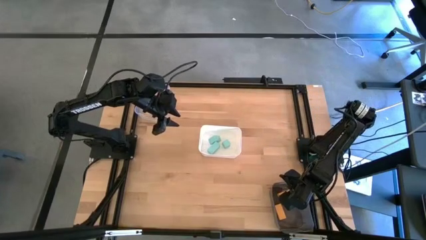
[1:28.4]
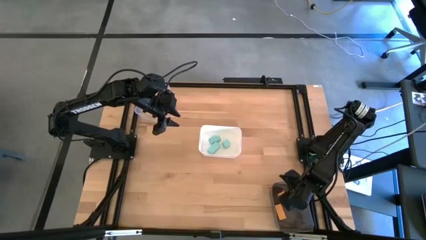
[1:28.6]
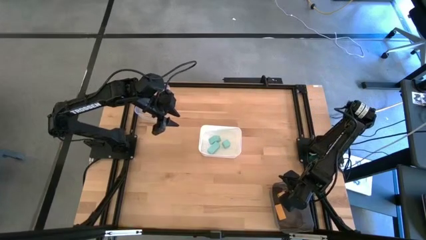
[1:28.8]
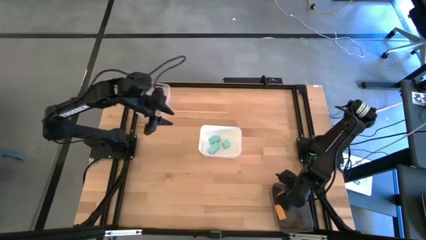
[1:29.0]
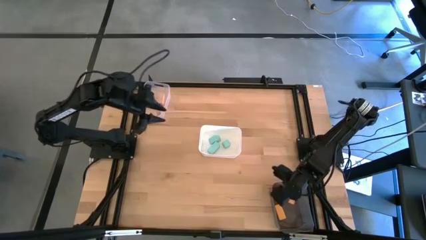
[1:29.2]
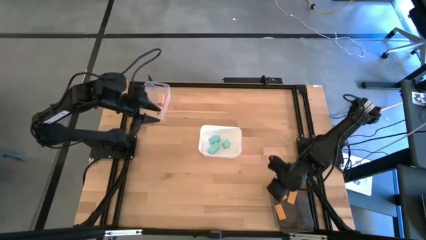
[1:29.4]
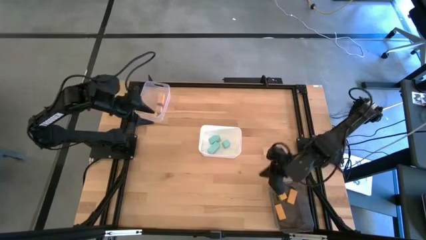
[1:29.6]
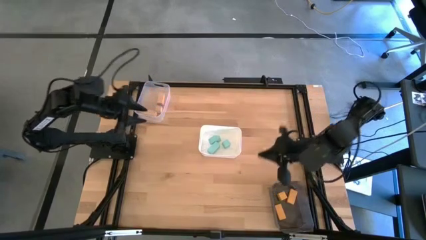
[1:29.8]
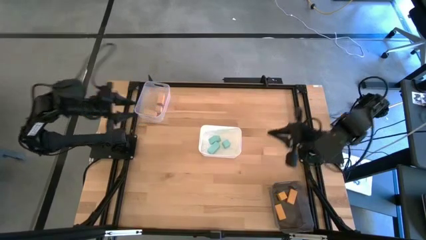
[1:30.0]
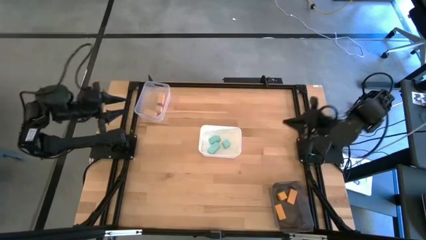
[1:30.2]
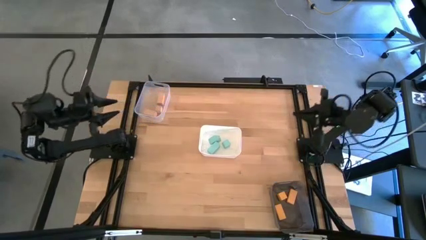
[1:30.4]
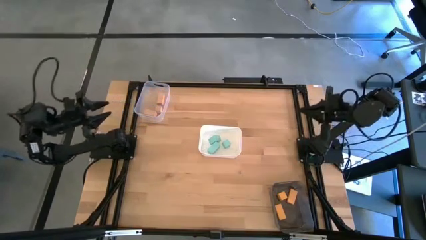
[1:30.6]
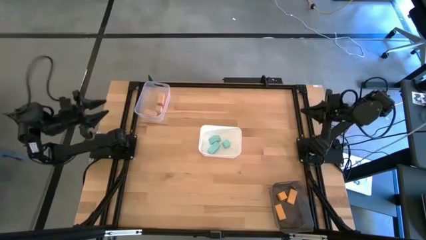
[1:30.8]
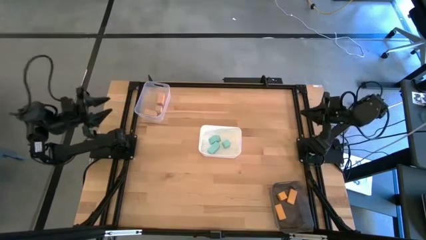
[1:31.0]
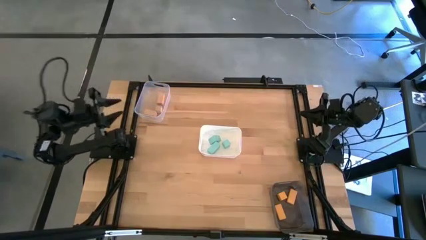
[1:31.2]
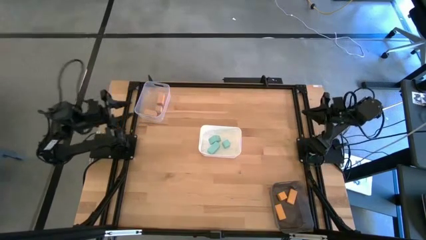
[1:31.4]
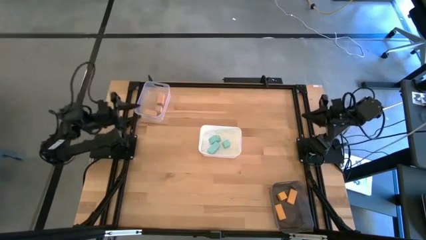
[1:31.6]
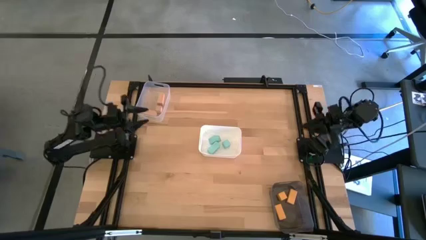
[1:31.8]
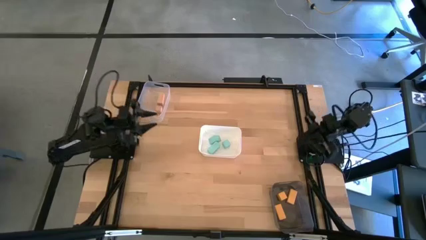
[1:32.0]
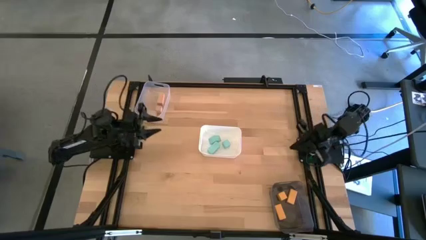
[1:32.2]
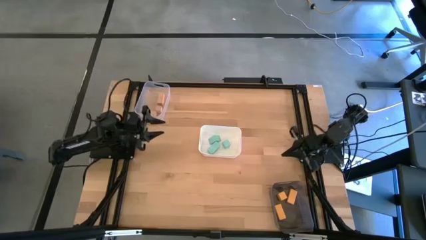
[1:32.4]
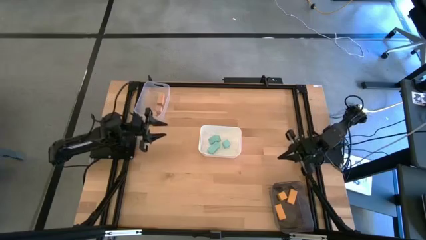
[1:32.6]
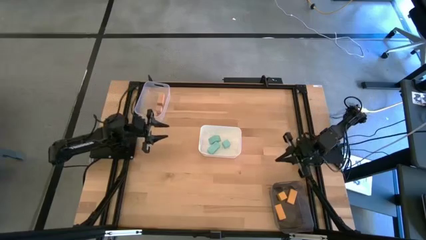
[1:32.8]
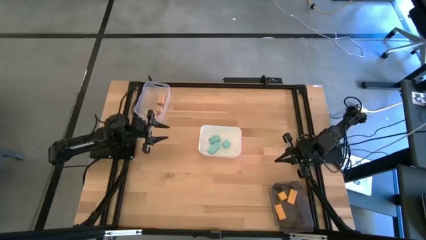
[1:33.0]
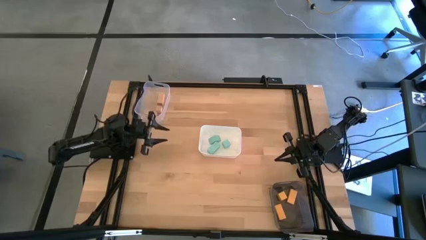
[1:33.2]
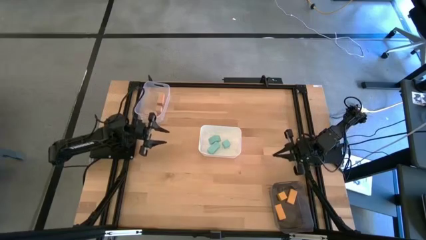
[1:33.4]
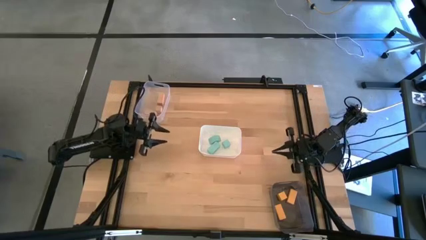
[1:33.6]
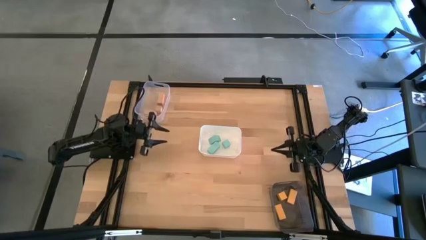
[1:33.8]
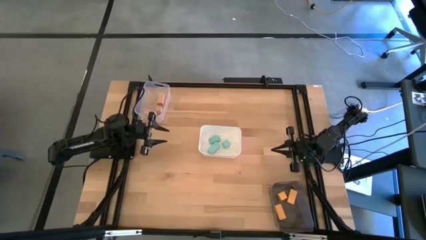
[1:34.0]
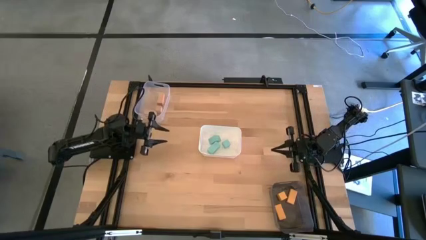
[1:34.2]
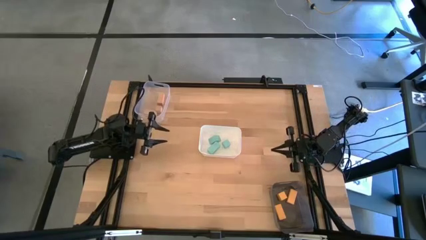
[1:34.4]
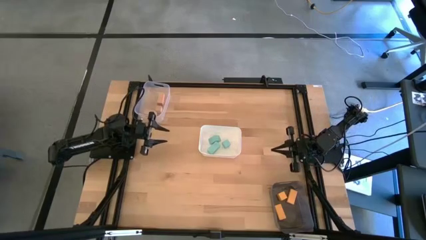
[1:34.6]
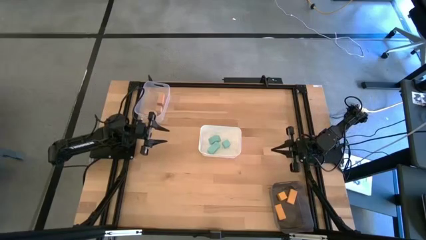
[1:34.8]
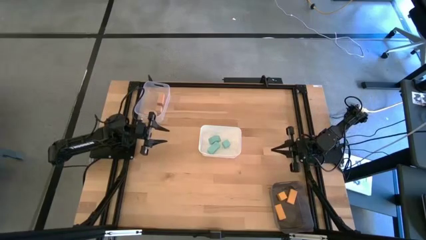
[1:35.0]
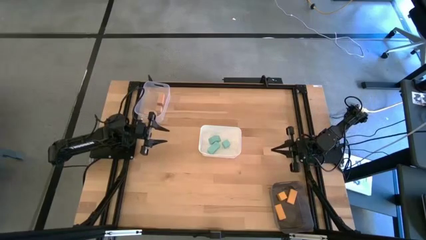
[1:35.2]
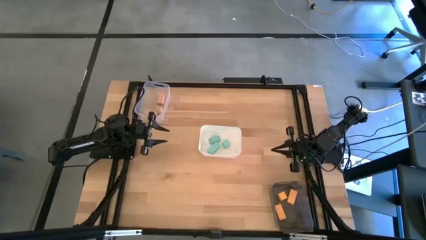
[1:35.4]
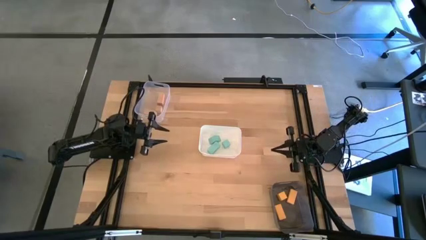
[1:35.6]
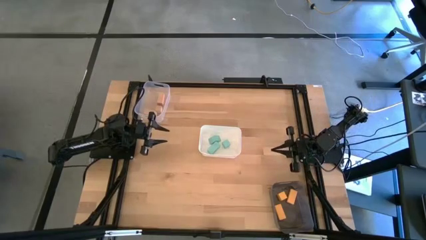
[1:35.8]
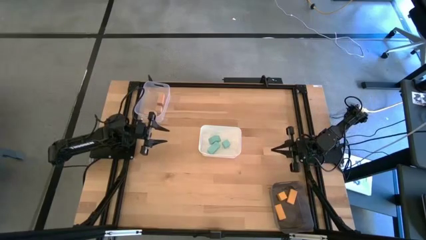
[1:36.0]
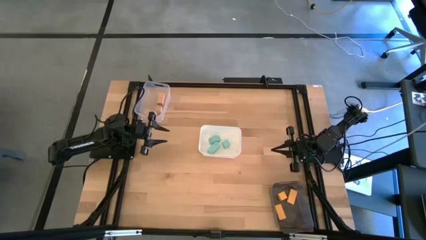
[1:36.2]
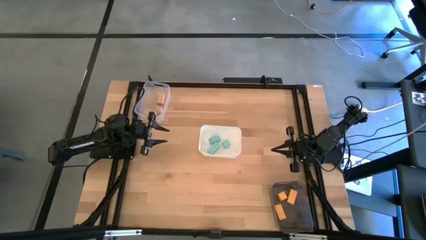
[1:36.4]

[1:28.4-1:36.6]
Task: Sort & place blocks by color
Return to Home Position

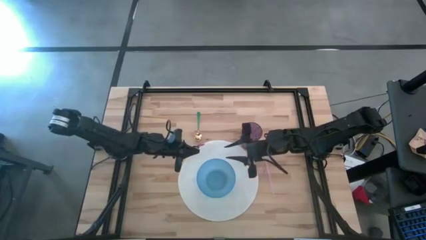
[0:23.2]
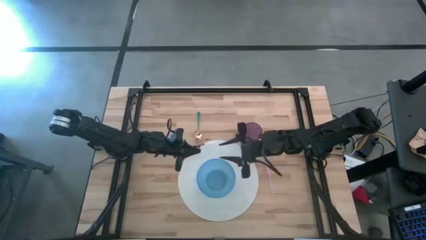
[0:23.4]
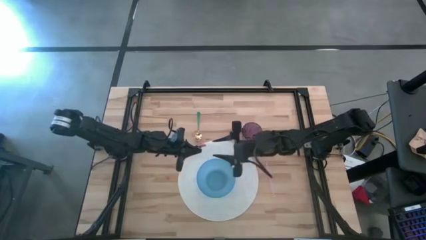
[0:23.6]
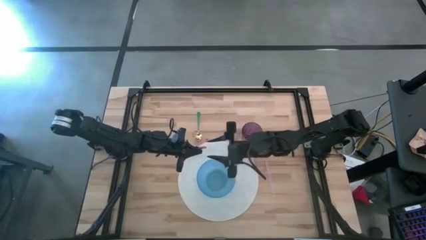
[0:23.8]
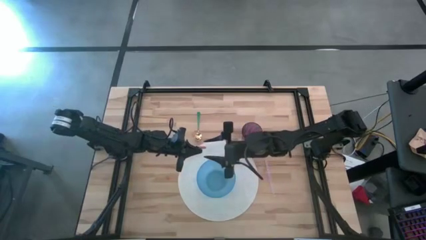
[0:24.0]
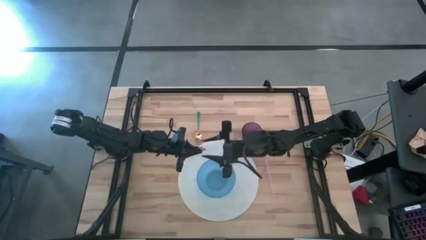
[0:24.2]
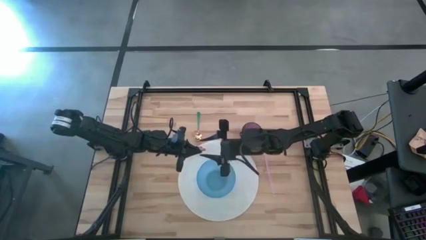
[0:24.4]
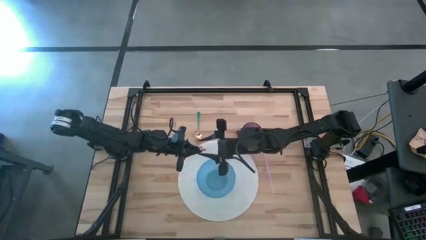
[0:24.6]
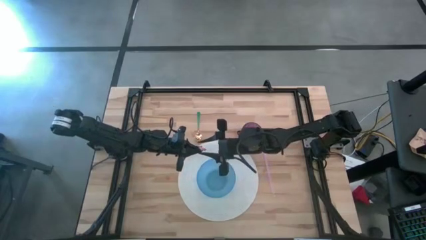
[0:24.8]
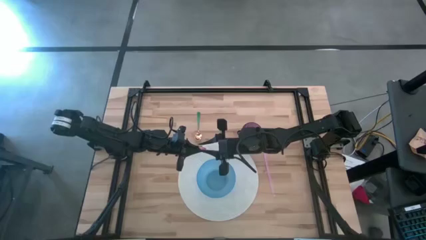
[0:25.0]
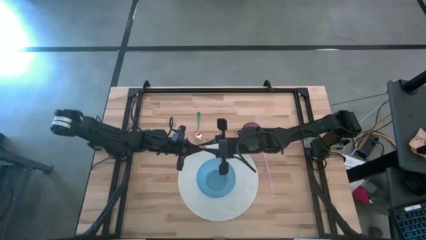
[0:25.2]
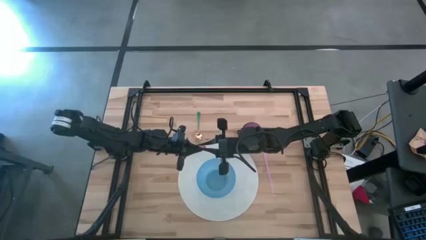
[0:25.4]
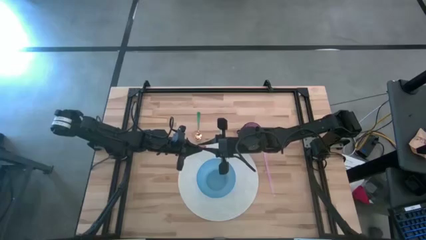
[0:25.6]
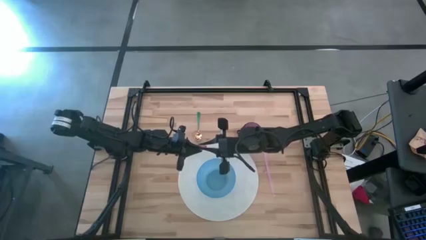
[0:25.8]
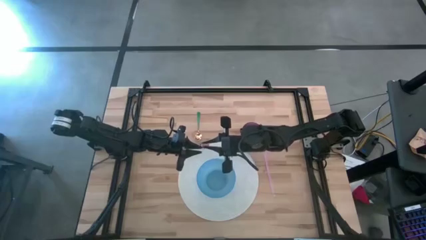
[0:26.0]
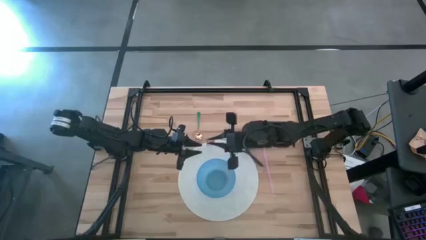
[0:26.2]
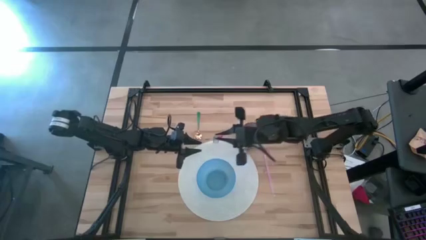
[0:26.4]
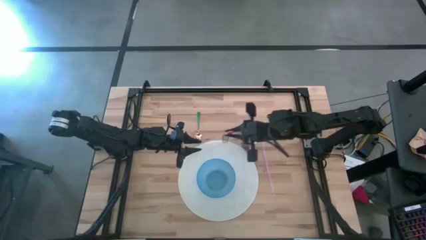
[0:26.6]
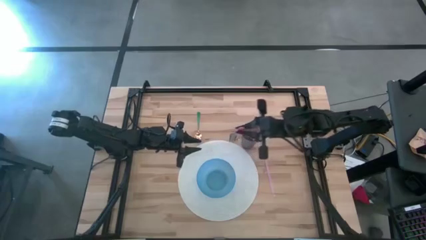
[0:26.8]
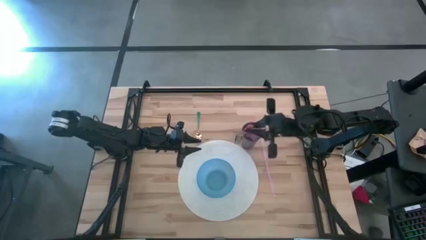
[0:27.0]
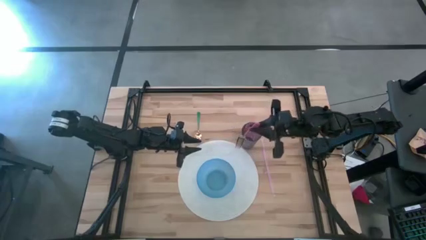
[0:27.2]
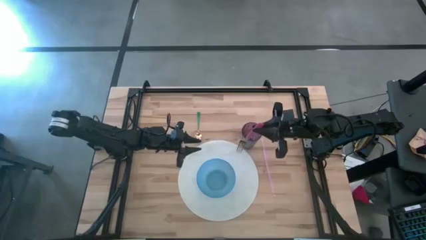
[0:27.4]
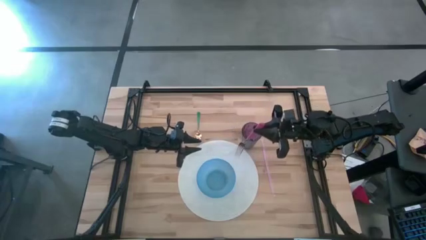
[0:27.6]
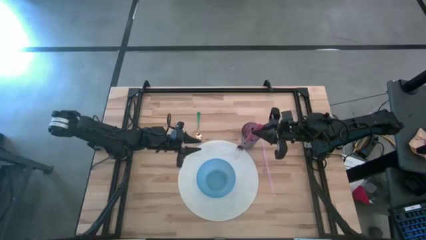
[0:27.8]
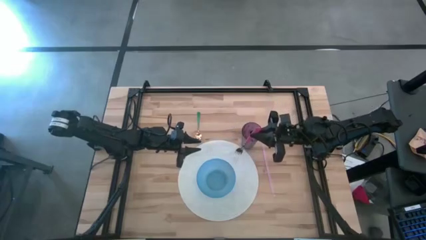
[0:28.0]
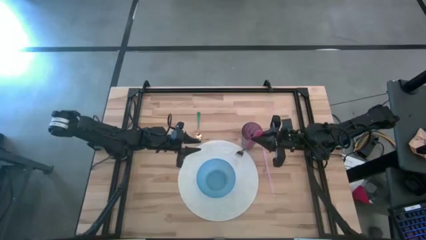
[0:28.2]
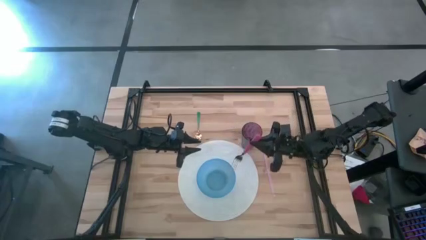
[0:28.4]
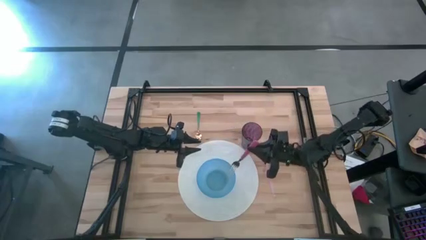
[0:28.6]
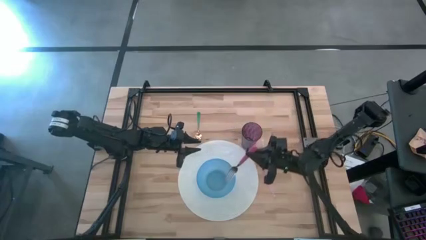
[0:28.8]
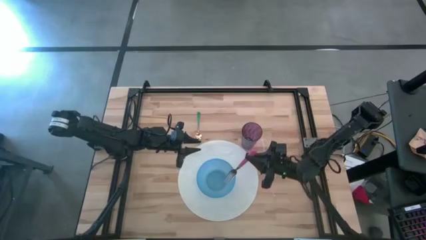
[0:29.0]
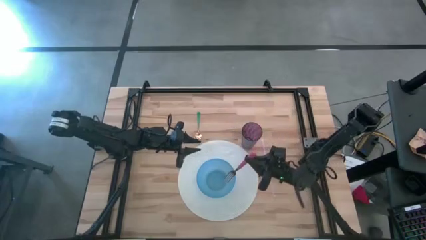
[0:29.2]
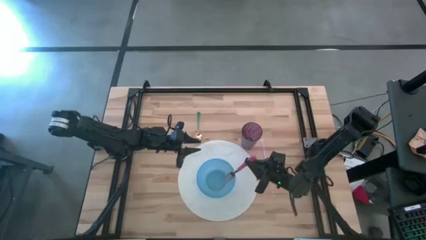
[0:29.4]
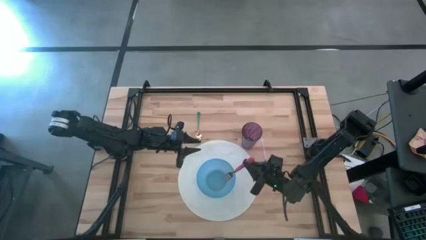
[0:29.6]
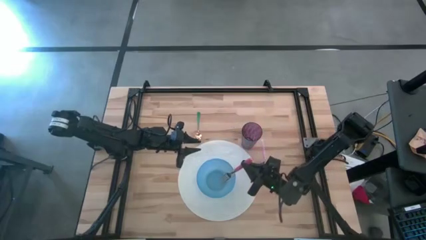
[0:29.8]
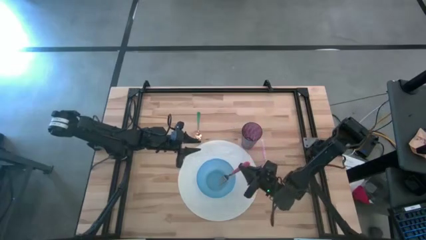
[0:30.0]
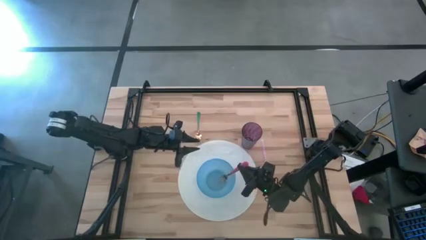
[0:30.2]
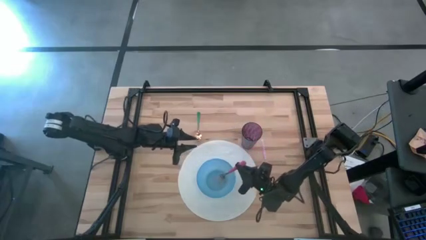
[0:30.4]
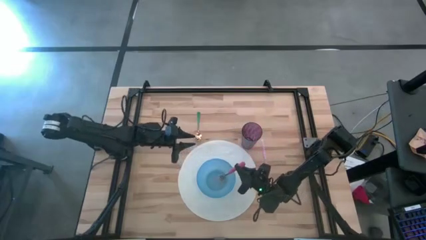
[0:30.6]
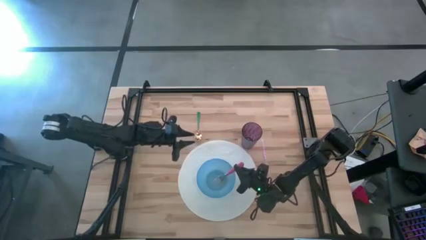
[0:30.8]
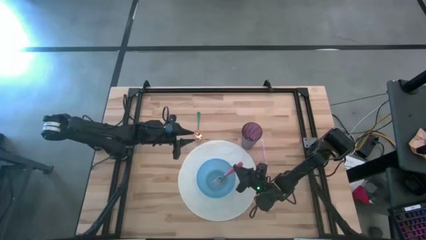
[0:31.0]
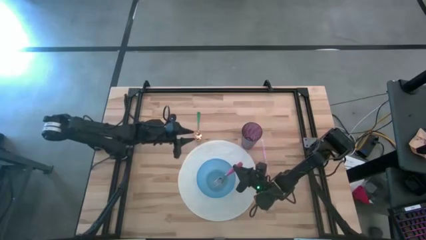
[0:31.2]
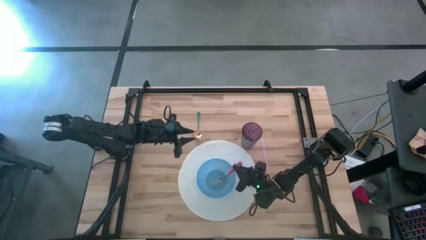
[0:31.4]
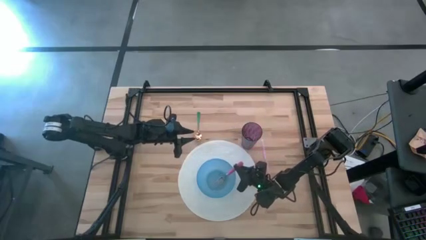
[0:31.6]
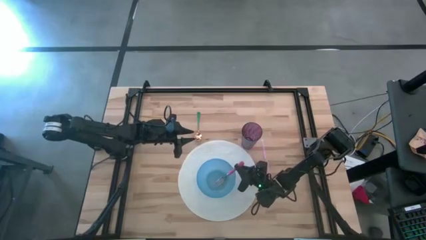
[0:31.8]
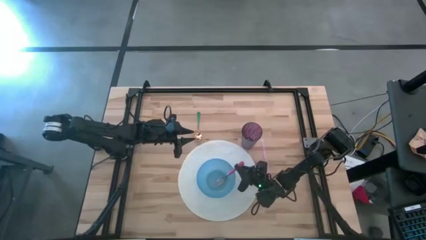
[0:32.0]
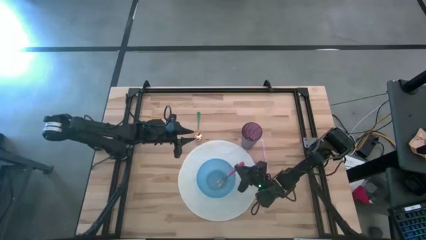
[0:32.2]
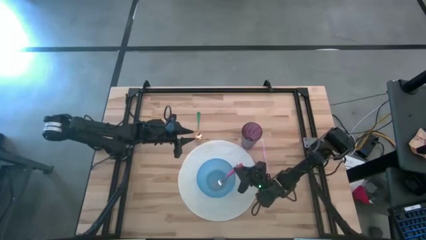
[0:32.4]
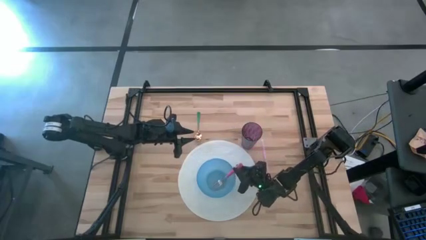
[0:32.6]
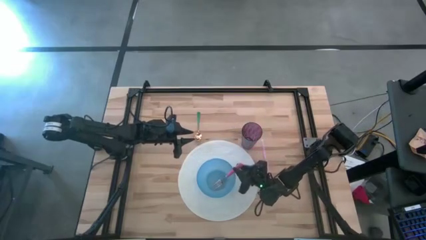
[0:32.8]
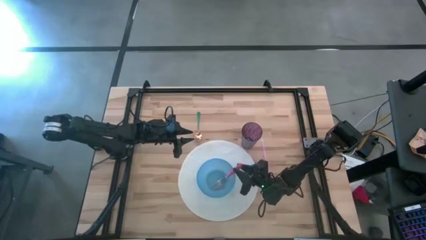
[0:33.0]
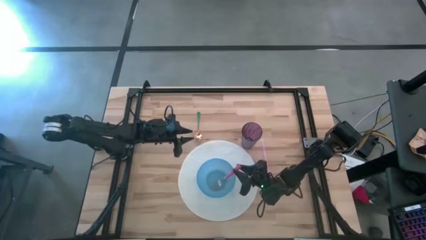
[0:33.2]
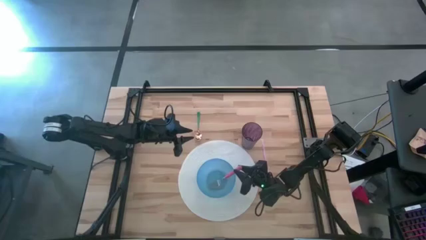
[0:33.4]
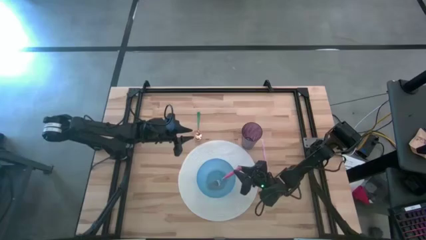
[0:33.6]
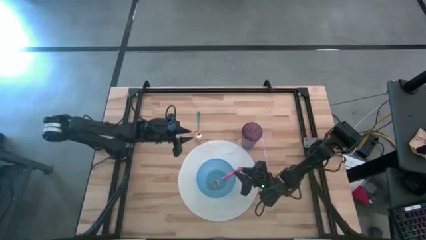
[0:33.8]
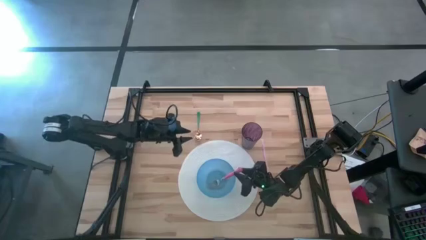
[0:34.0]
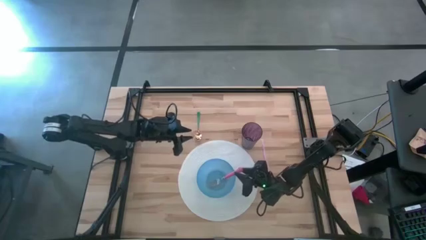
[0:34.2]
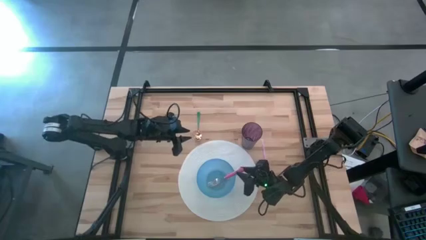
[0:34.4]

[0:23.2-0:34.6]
Task: Pick & Place Utensil
Put the red fork into the blue bowl
